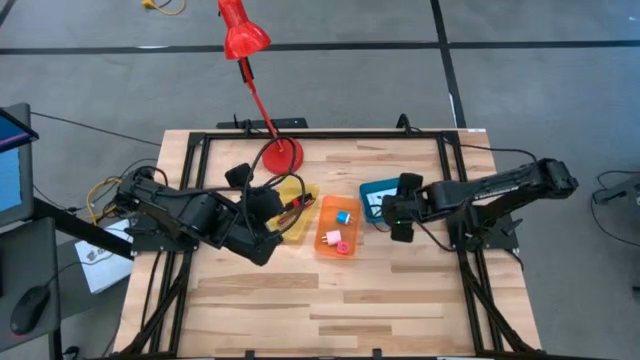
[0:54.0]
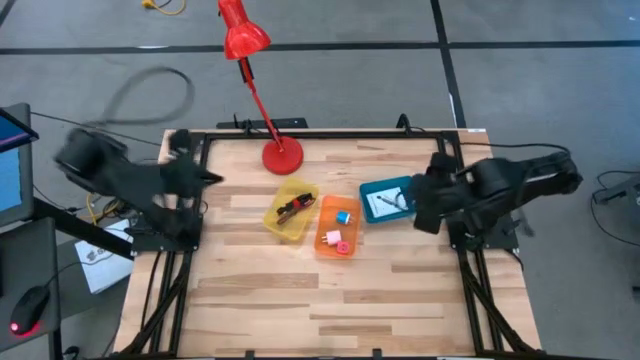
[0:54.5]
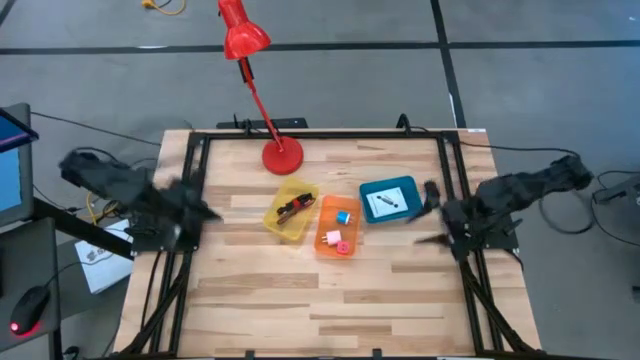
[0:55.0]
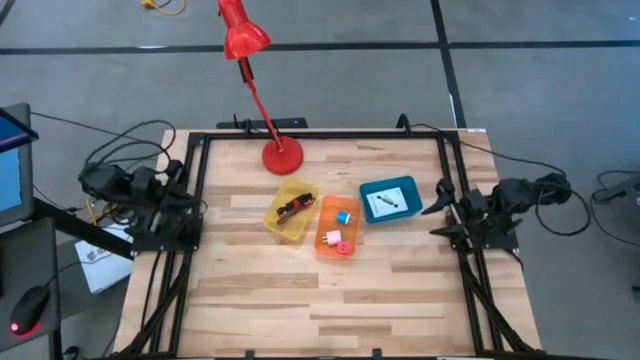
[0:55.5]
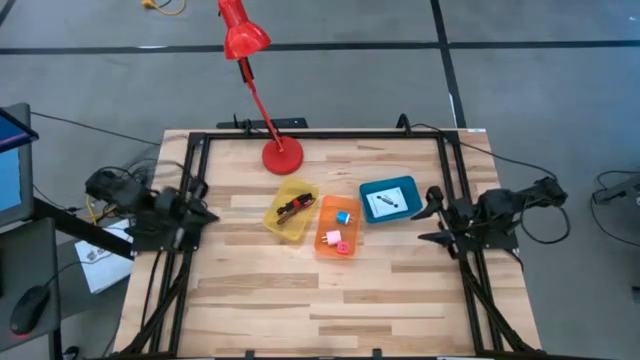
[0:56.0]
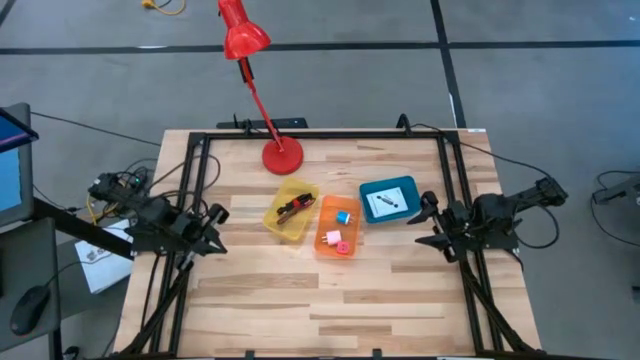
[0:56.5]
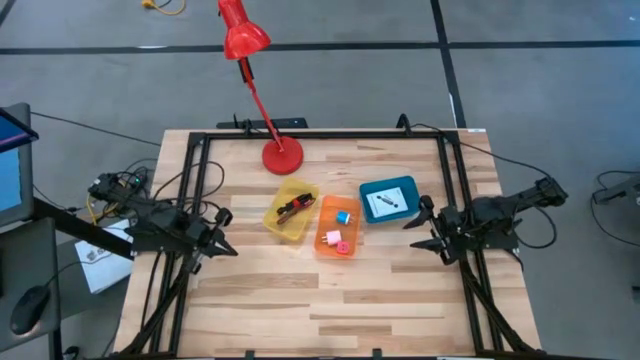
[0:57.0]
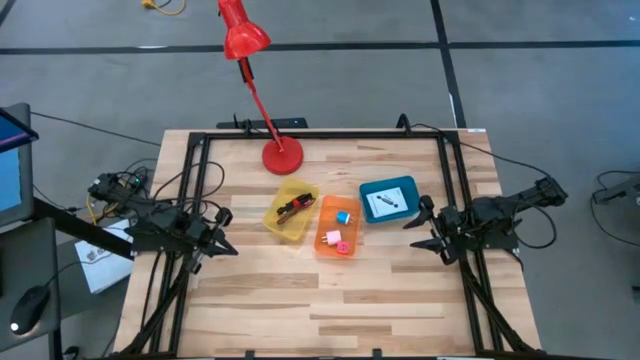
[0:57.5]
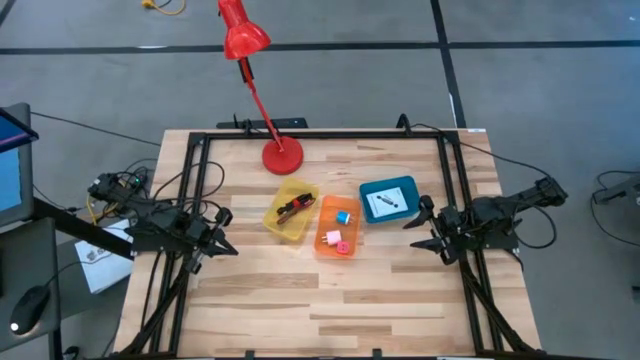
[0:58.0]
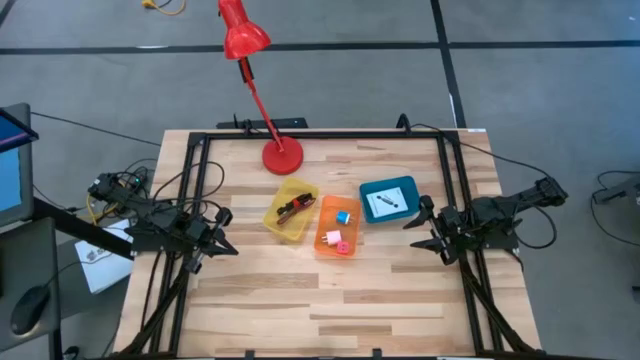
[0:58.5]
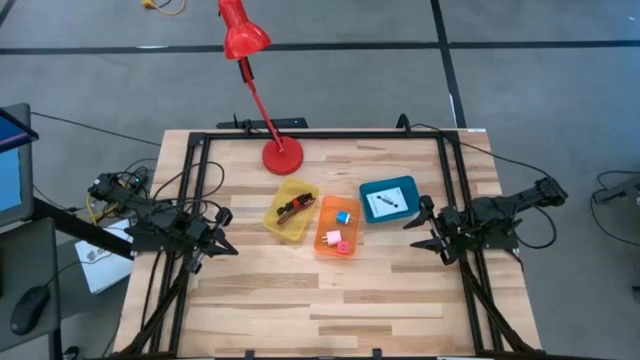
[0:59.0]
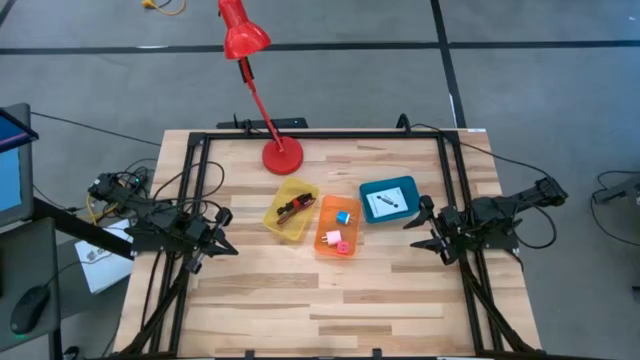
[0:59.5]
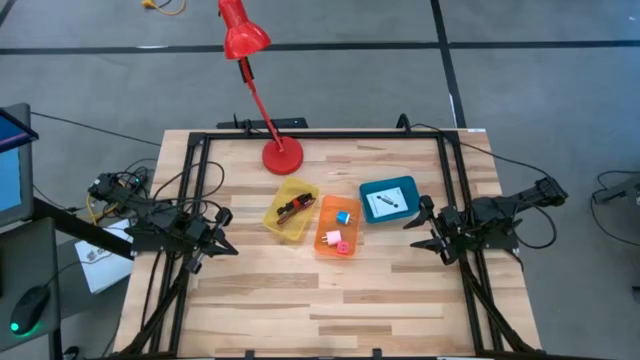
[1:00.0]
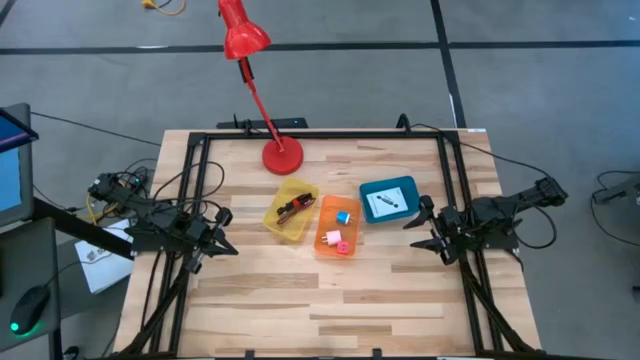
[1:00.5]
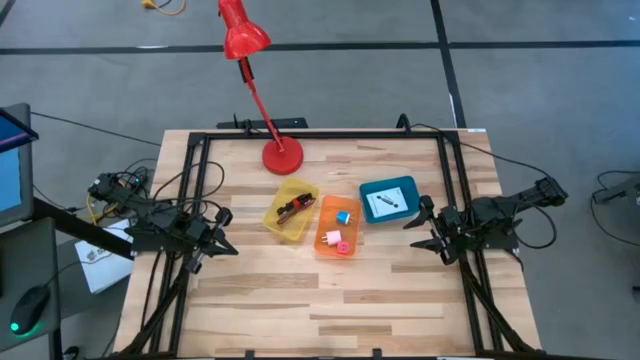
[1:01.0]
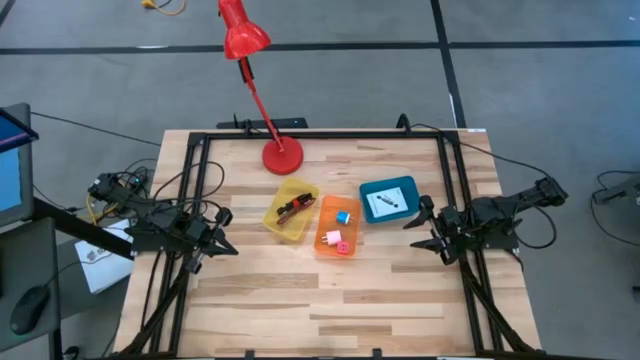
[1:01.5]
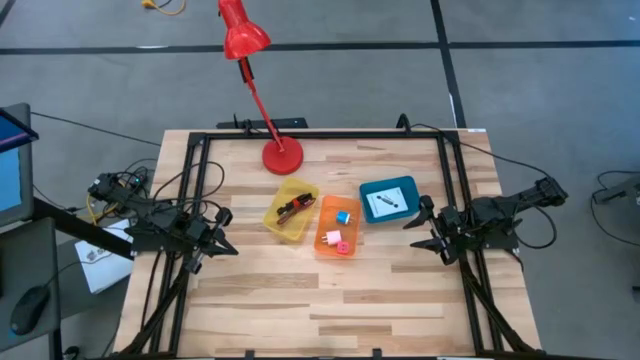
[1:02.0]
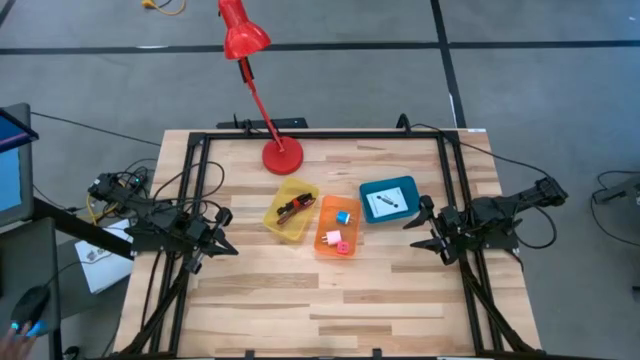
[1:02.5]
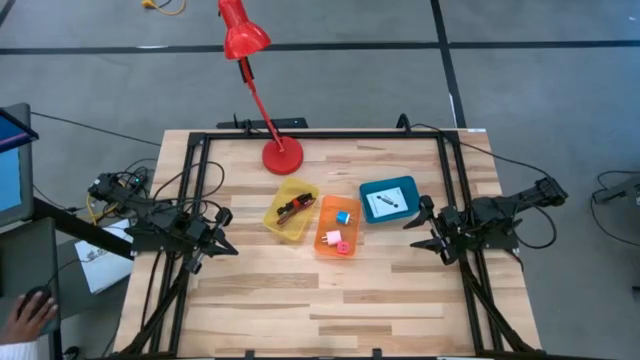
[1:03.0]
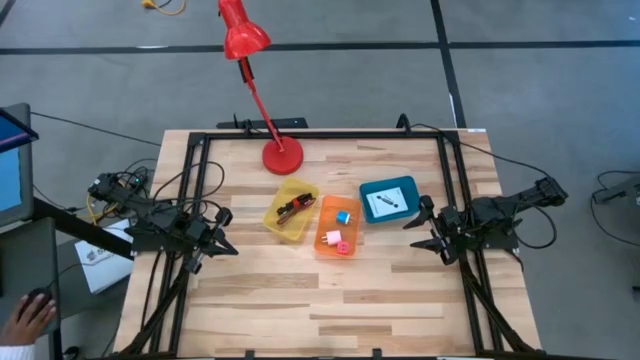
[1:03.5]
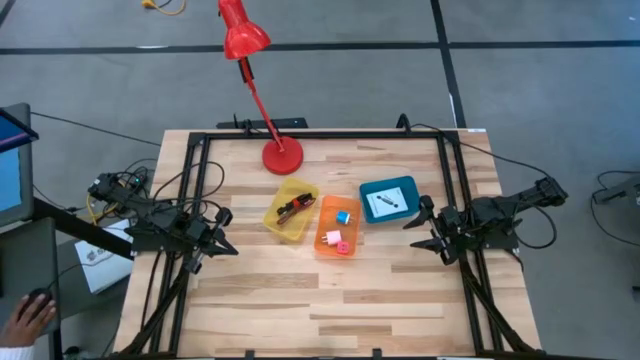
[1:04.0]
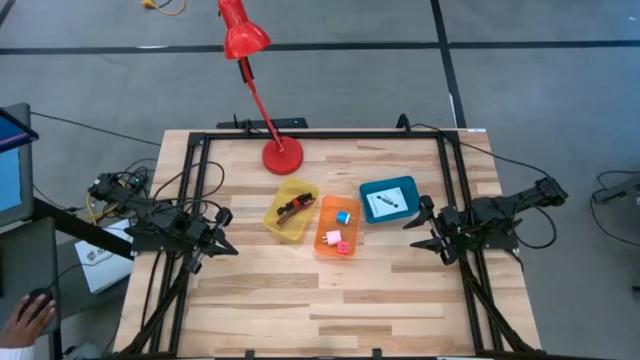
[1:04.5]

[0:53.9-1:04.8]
Task: Pick and place items into bin
Return to Home Position

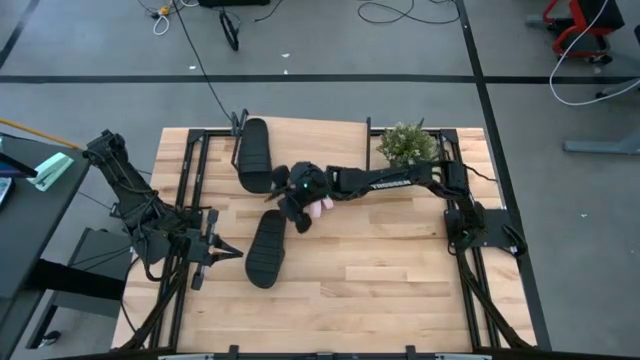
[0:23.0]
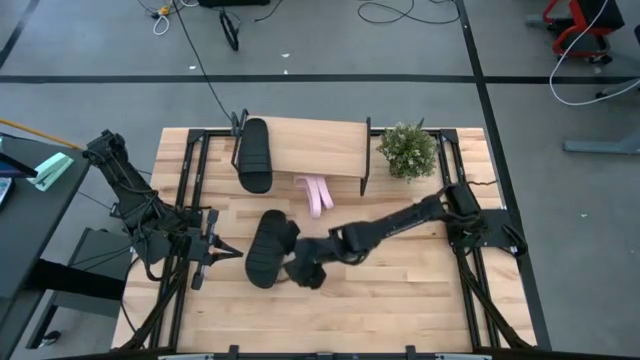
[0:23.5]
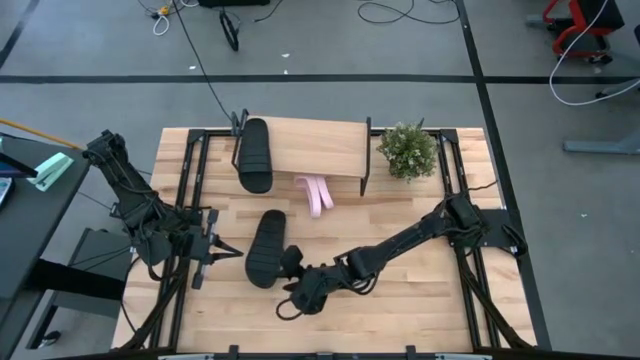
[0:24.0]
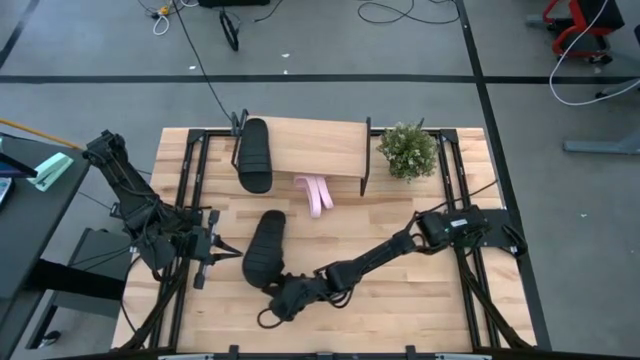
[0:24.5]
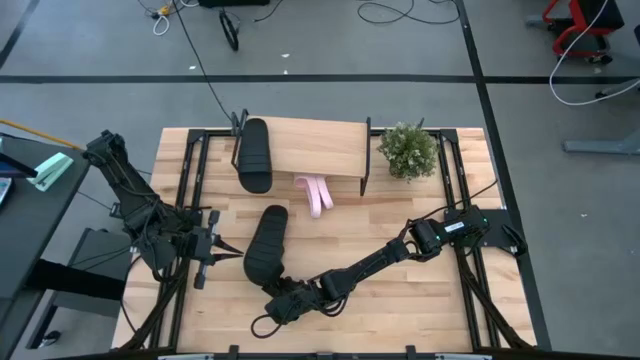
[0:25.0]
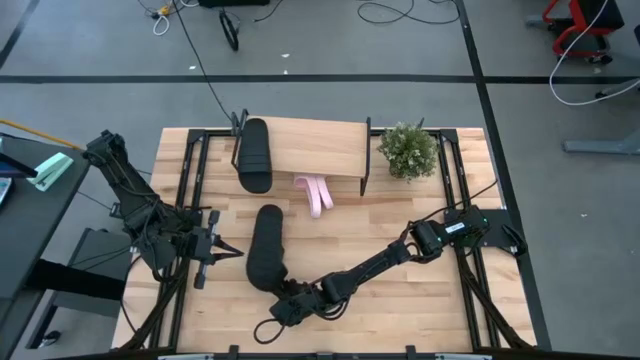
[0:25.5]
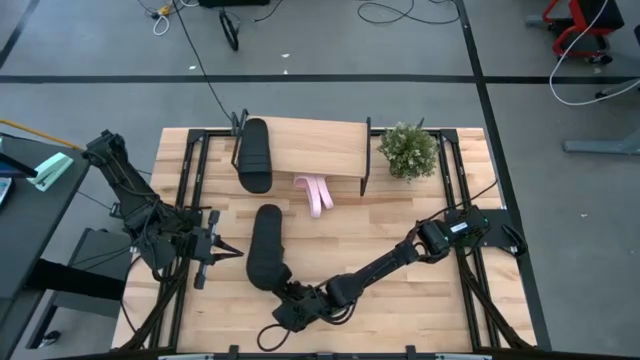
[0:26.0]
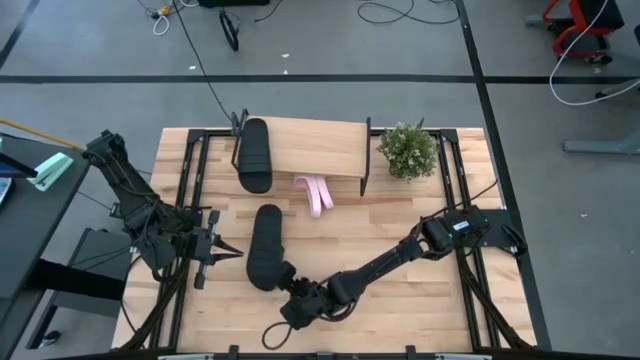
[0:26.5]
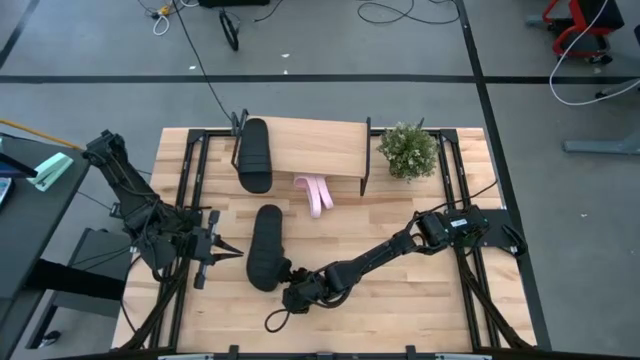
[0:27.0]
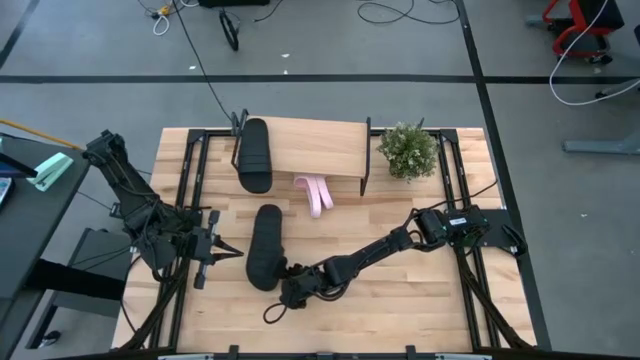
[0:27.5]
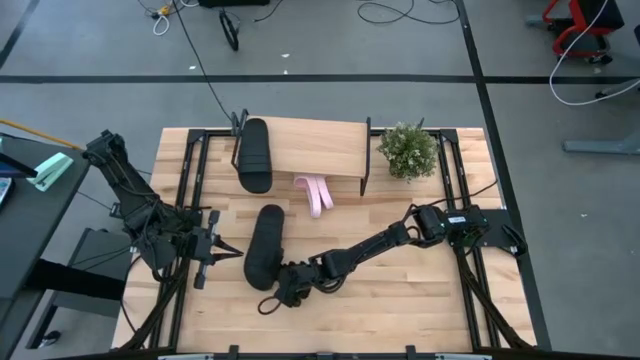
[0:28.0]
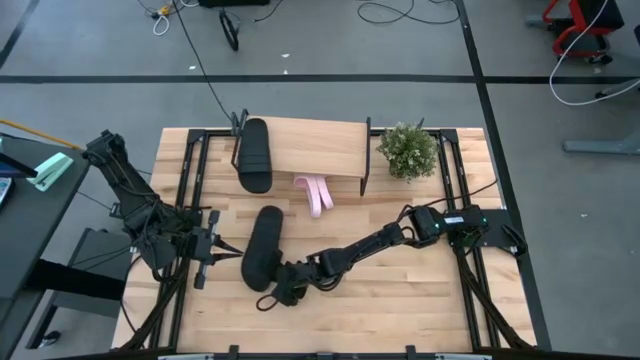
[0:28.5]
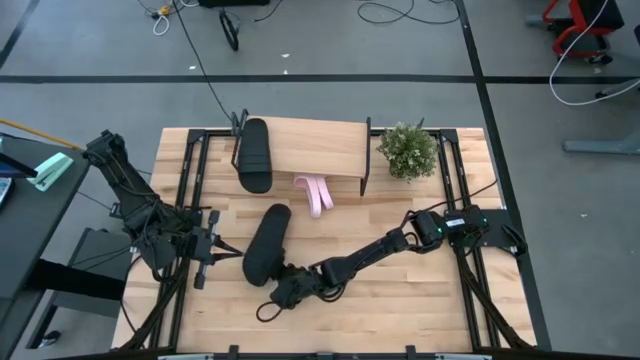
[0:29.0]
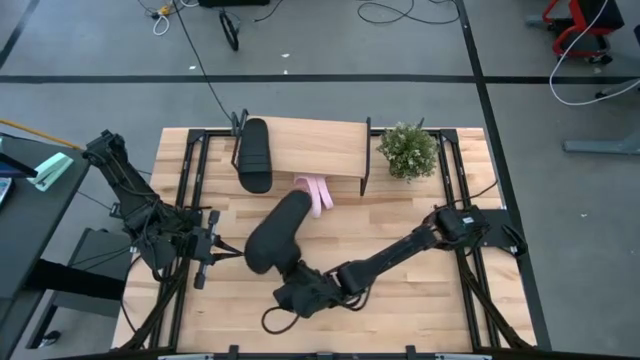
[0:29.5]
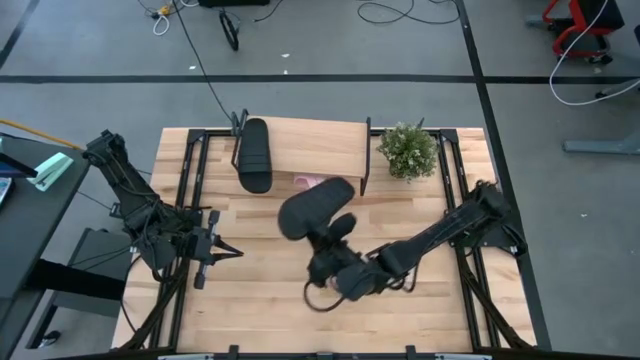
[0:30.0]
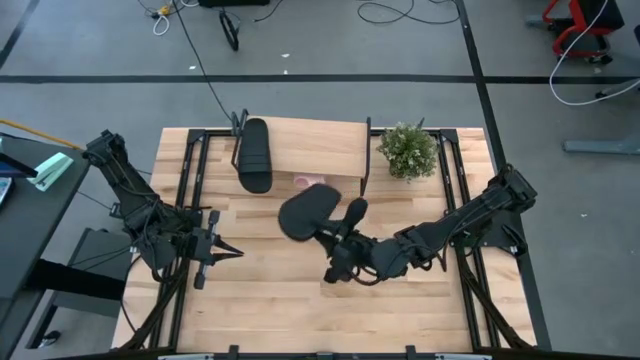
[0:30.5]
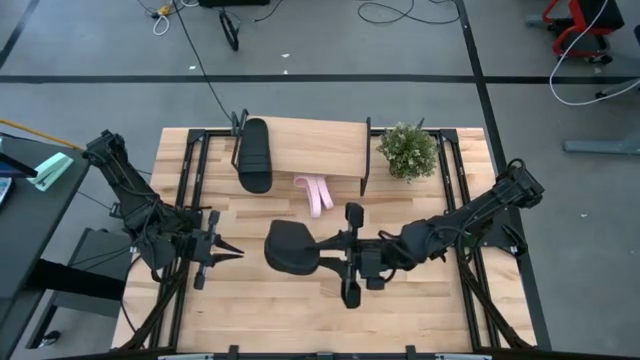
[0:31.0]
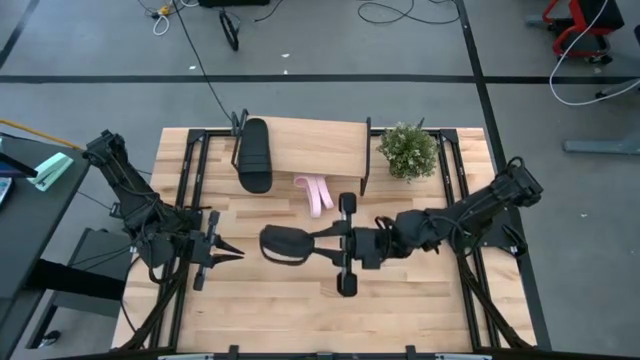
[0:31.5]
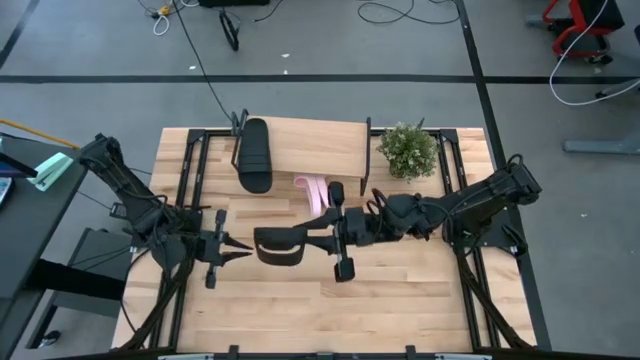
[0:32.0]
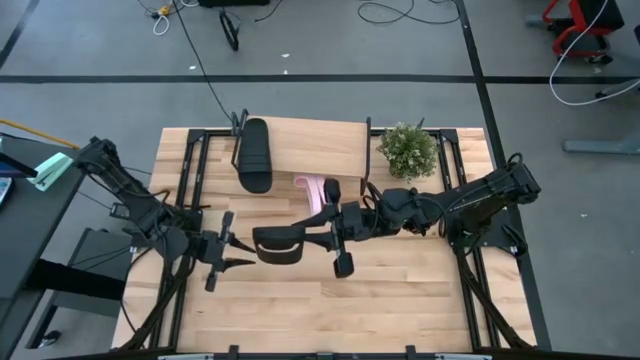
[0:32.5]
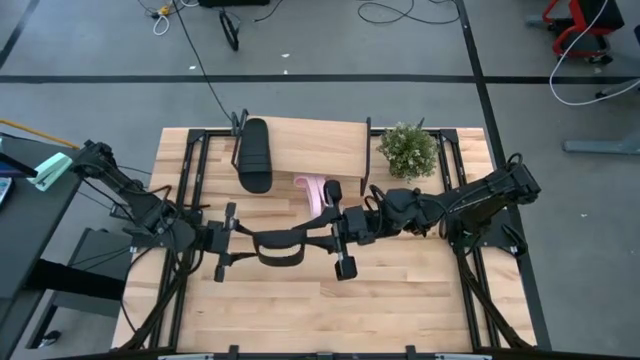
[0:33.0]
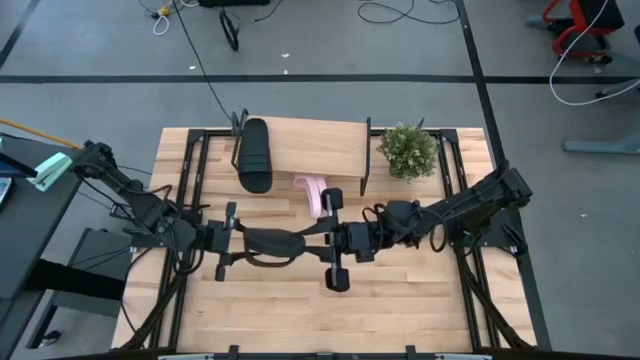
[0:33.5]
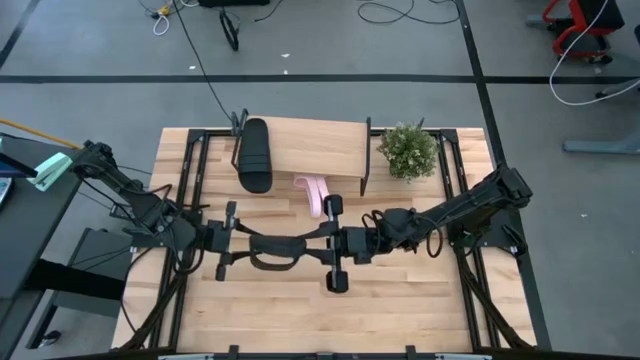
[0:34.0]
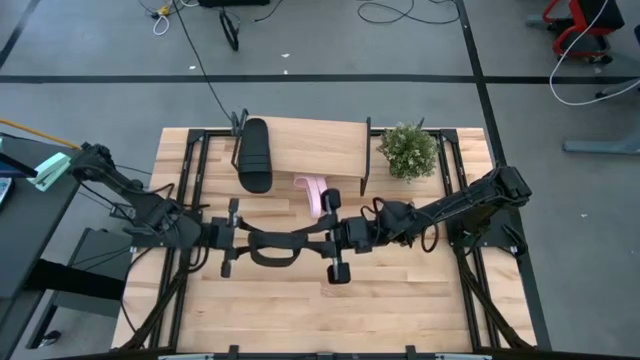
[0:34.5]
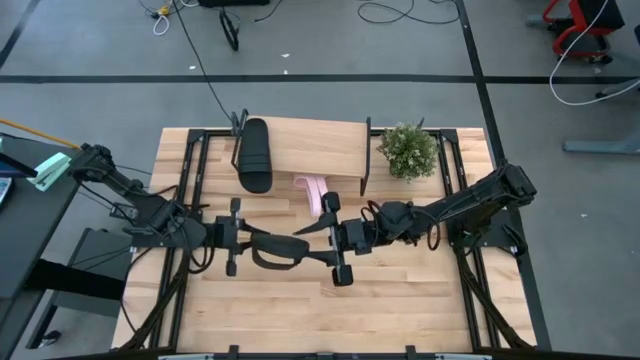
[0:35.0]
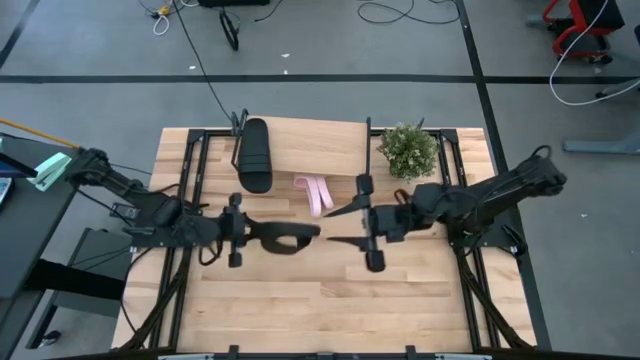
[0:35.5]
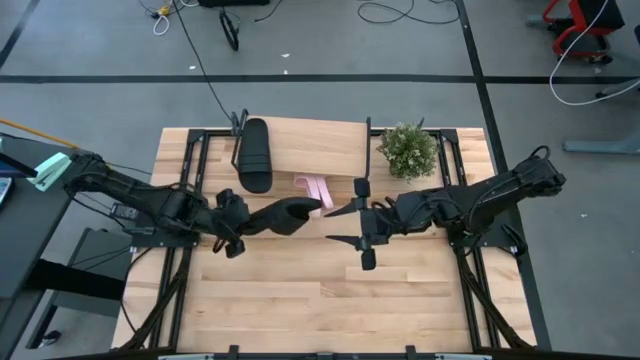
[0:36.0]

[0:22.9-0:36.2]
Task: Pick and place slides into the shelf
Put the black slide on the shelf
